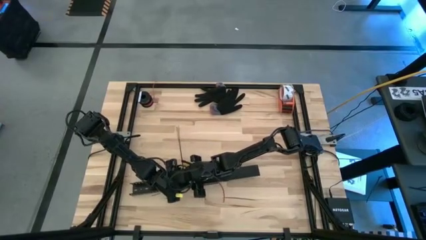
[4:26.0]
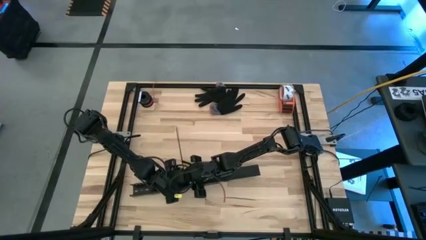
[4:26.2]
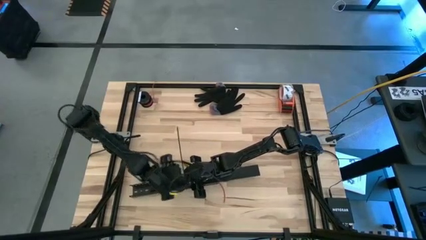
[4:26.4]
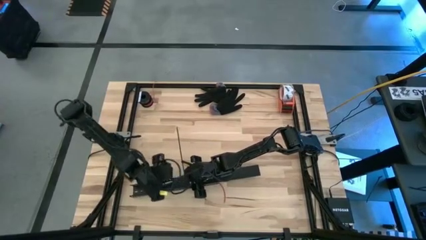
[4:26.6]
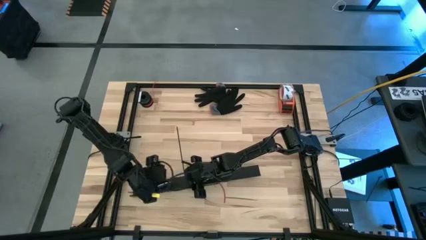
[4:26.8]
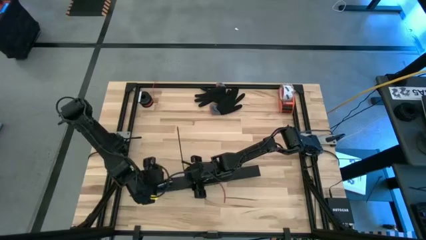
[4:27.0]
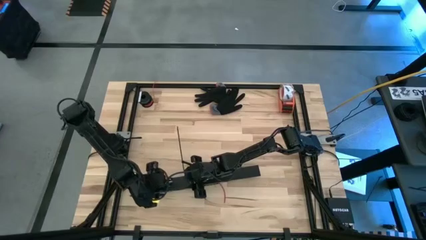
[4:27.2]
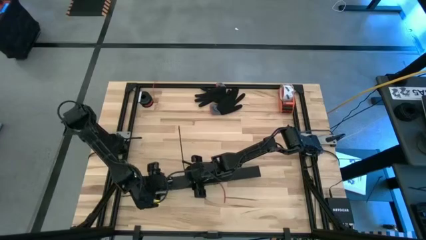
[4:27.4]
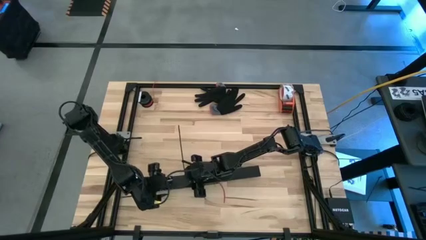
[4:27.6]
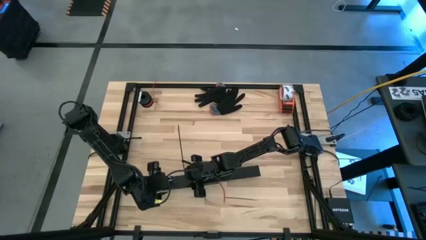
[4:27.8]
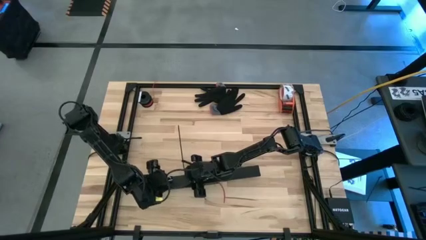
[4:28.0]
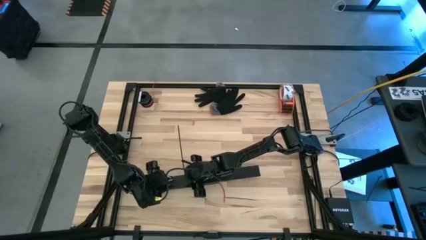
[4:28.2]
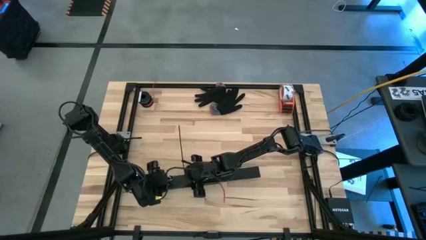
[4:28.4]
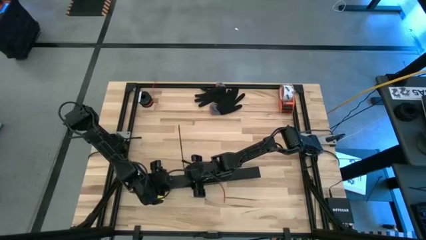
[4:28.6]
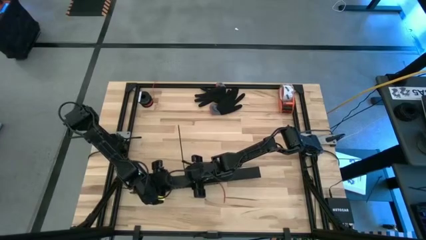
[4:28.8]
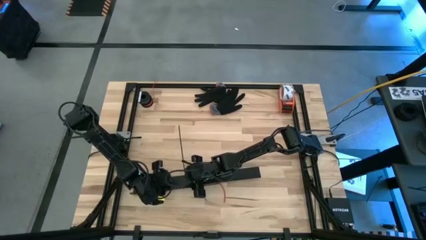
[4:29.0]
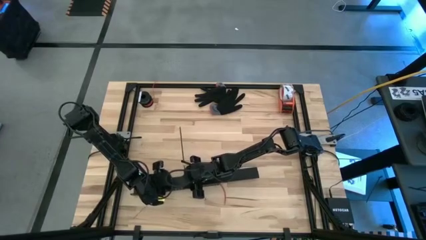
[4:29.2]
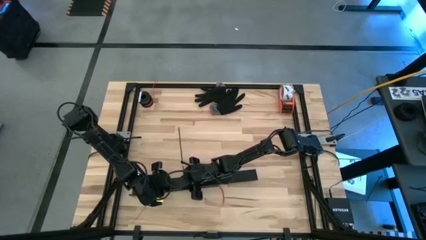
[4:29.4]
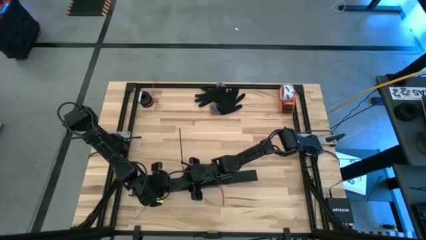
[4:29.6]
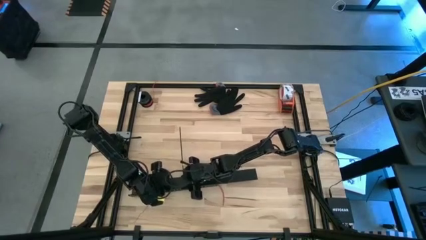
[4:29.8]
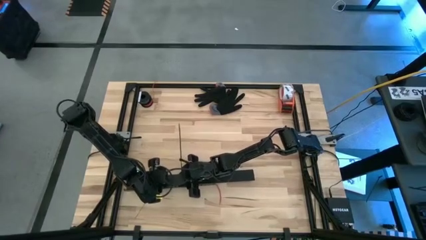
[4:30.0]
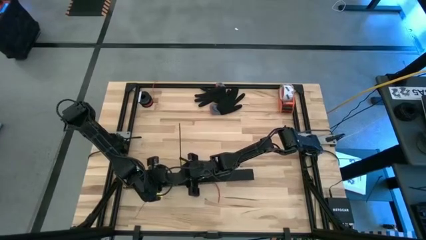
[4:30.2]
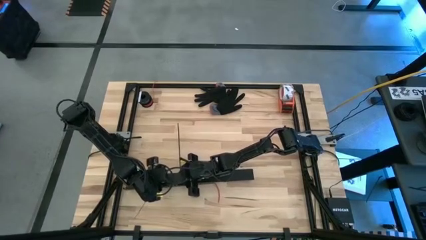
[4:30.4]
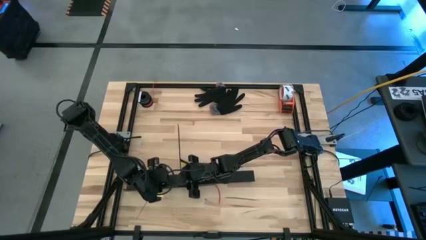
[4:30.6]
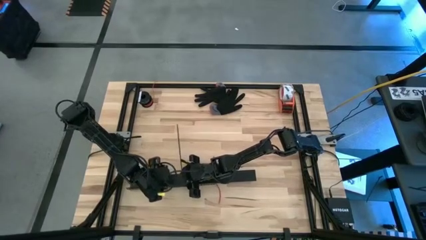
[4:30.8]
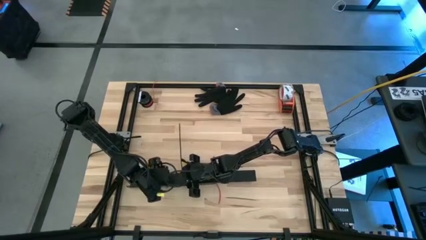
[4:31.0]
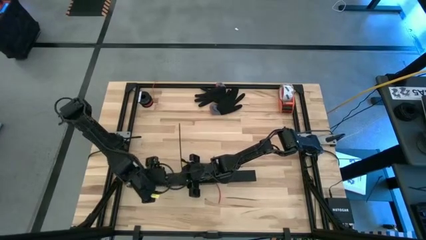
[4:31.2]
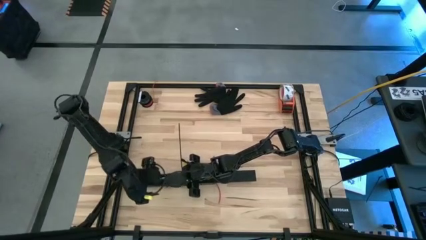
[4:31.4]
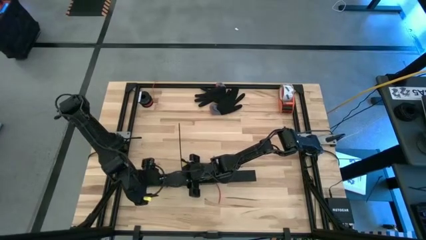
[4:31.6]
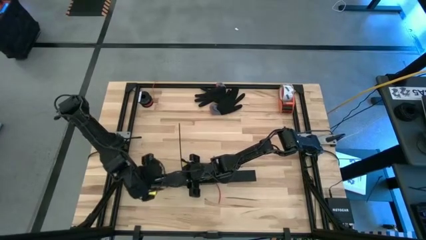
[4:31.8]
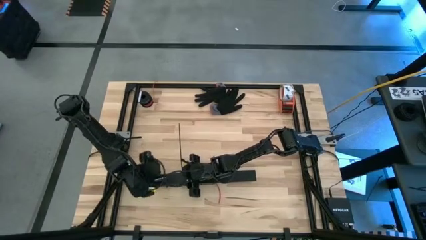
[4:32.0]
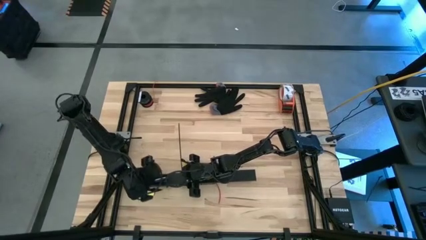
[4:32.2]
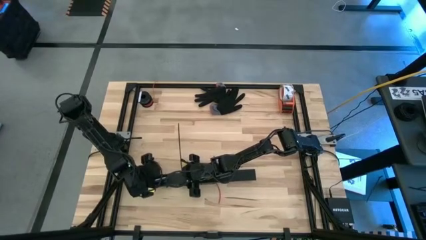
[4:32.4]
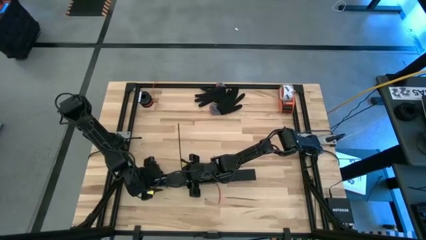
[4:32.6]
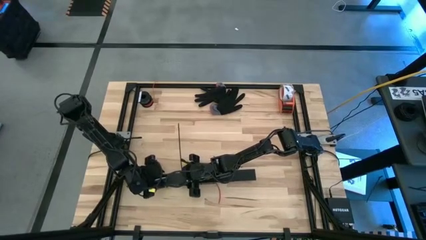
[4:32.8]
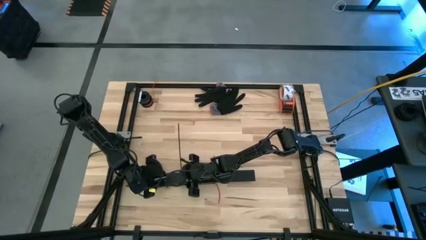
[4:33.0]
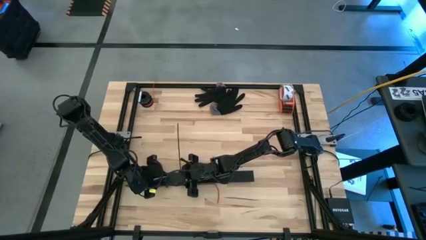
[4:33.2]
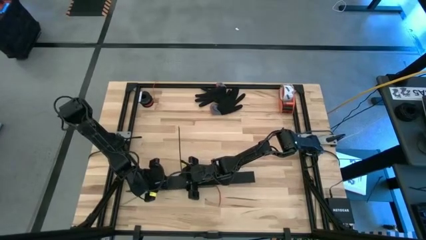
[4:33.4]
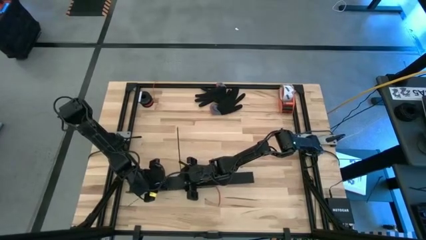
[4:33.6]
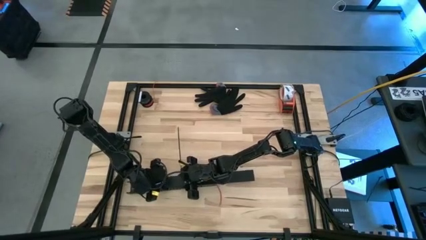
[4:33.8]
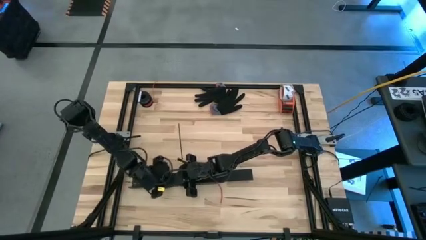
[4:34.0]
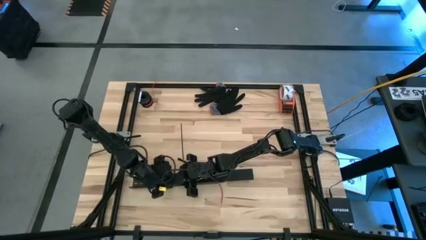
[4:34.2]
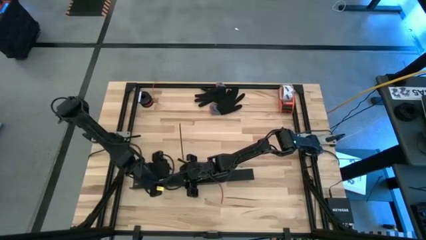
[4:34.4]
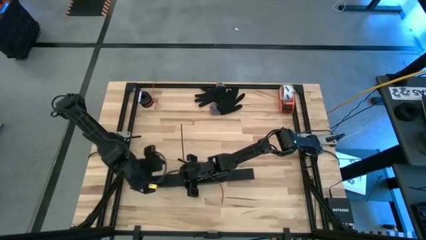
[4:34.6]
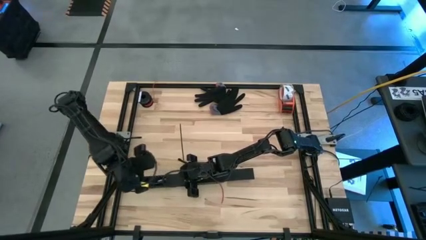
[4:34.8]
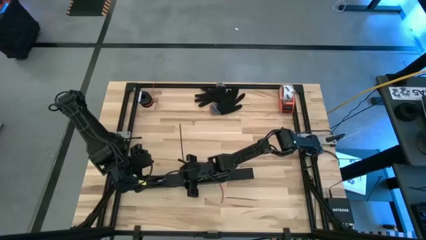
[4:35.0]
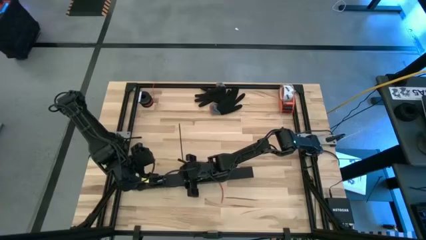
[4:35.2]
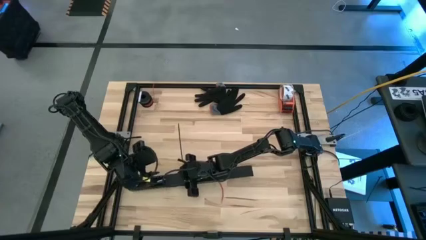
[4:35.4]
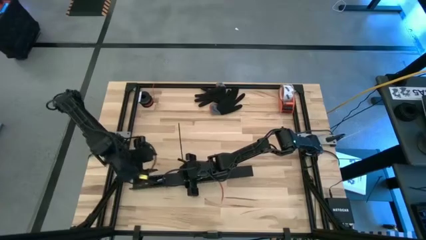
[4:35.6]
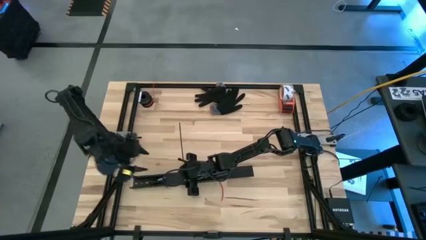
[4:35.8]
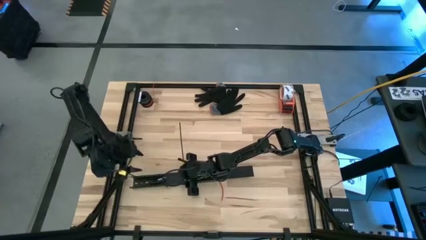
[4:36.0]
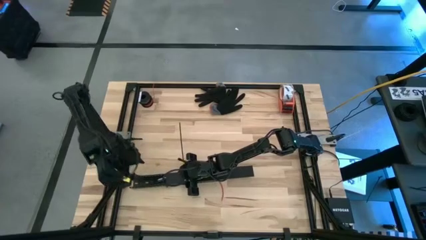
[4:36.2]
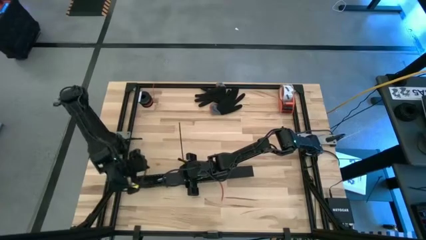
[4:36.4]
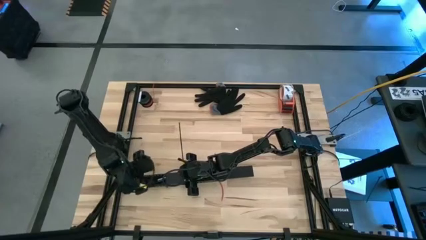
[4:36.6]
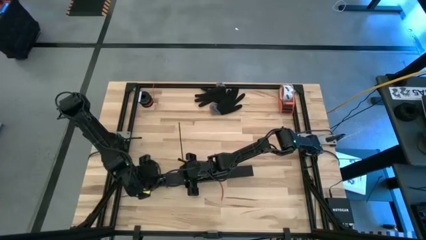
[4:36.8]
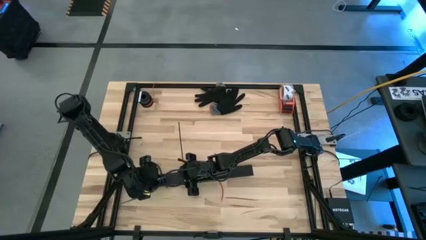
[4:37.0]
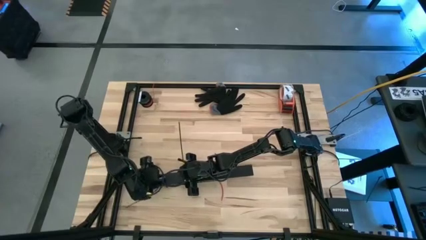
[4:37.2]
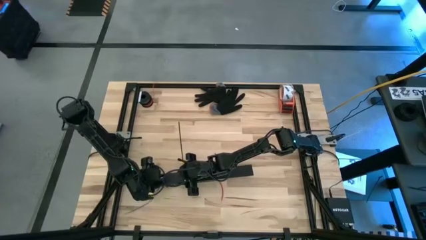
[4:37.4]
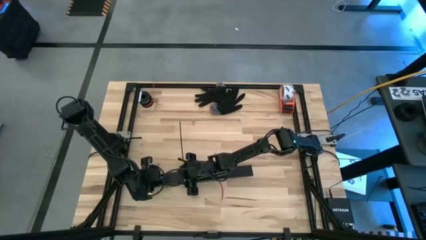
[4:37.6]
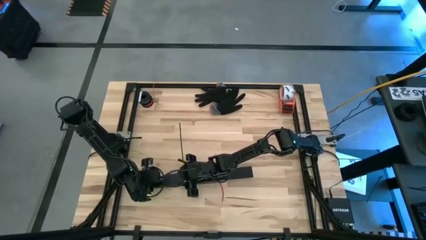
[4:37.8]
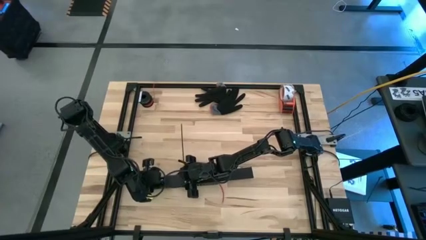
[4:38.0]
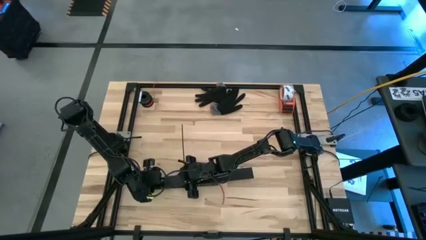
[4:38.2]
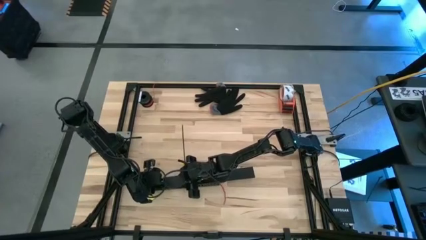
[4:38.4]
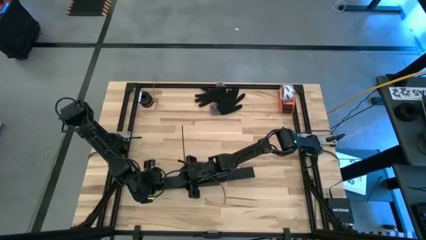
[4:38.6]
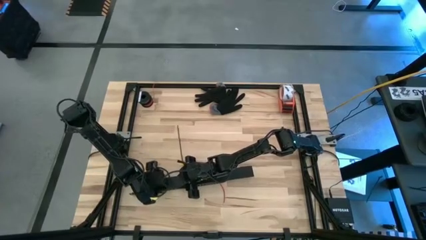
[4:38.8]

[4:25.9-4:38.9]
Task: Ziptie cables
Close the black cable duct lid
